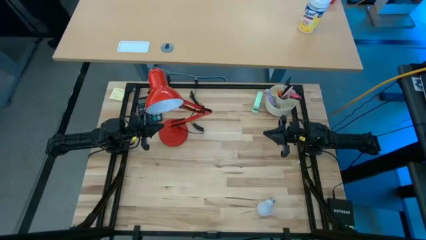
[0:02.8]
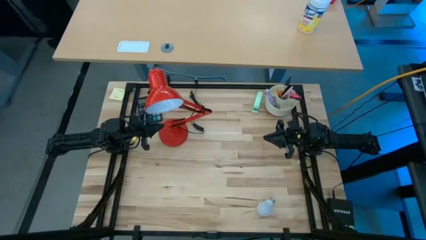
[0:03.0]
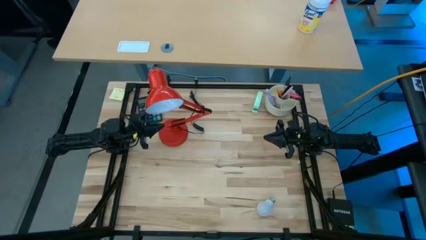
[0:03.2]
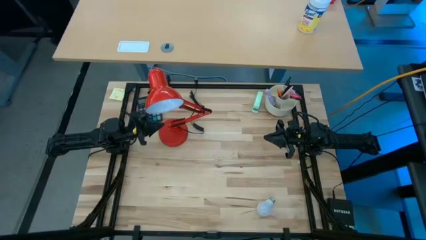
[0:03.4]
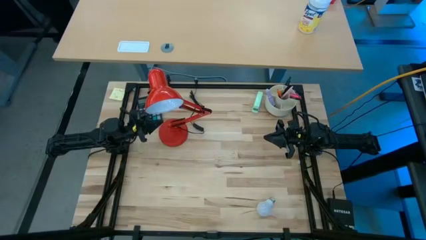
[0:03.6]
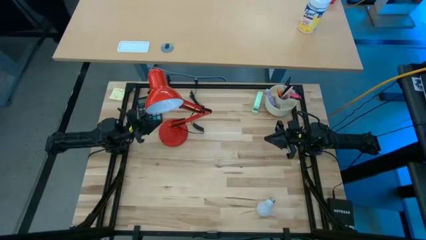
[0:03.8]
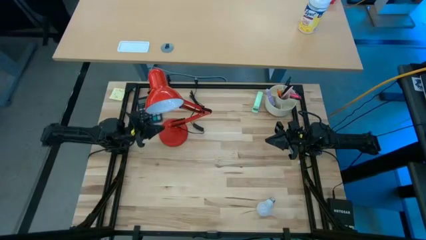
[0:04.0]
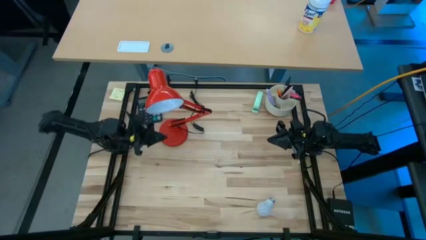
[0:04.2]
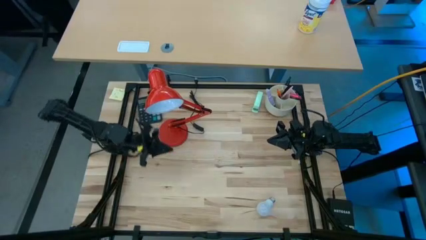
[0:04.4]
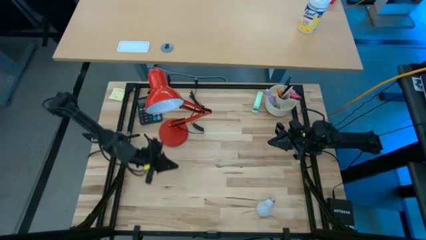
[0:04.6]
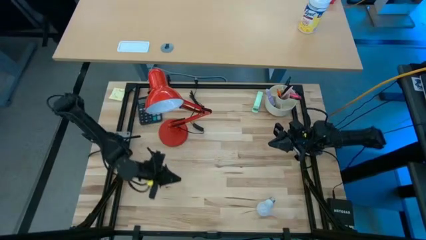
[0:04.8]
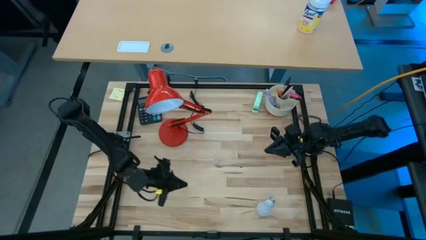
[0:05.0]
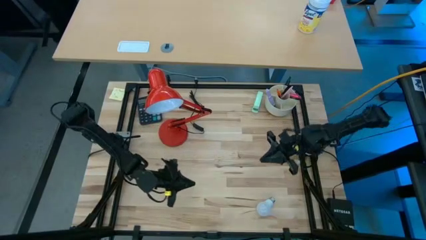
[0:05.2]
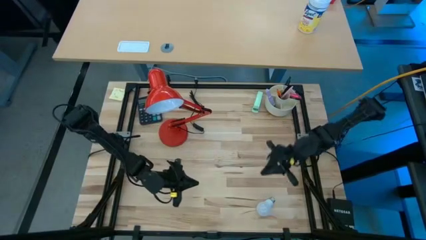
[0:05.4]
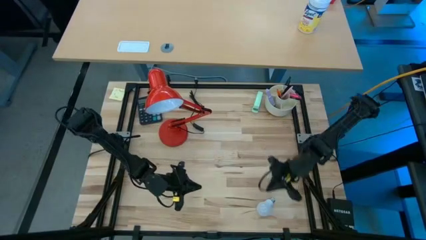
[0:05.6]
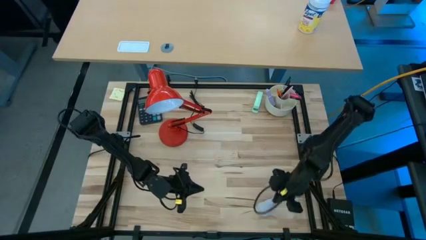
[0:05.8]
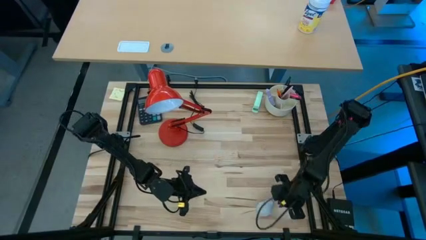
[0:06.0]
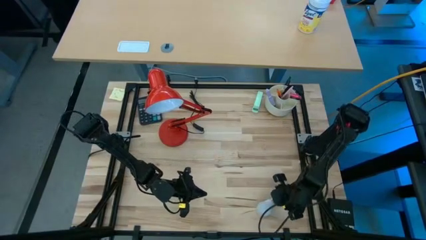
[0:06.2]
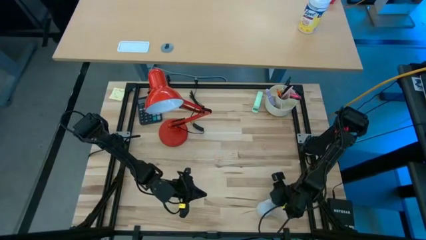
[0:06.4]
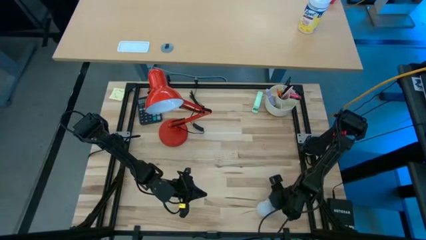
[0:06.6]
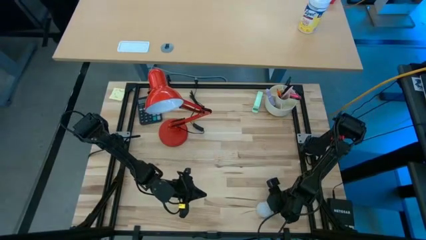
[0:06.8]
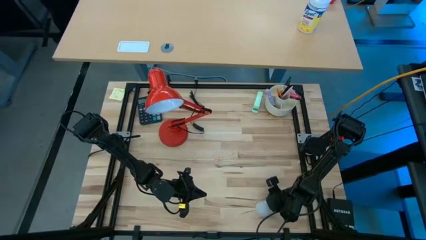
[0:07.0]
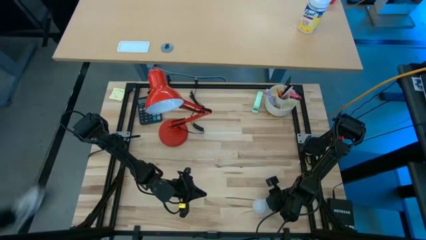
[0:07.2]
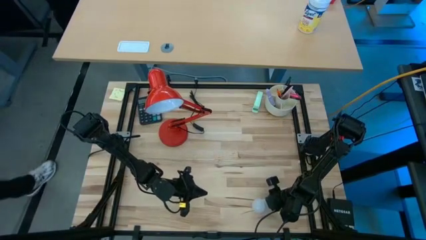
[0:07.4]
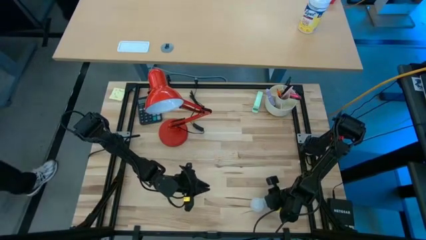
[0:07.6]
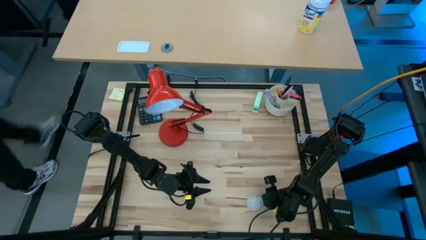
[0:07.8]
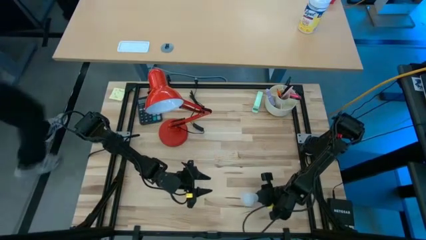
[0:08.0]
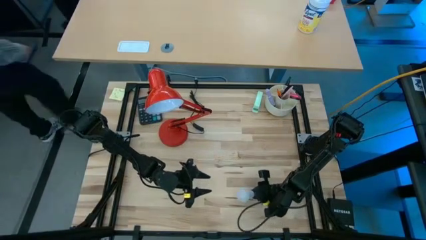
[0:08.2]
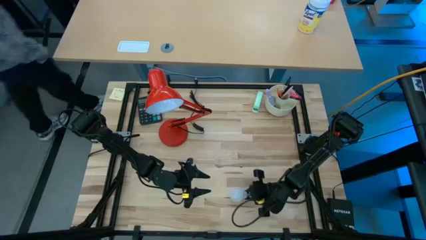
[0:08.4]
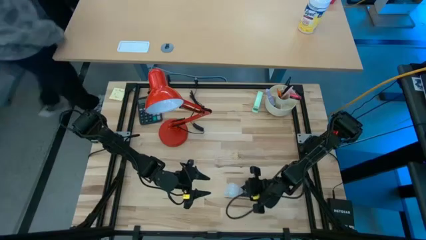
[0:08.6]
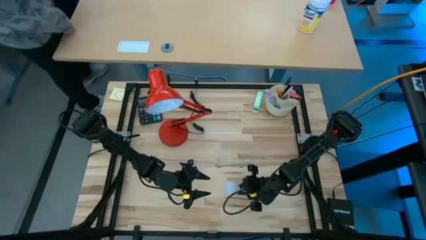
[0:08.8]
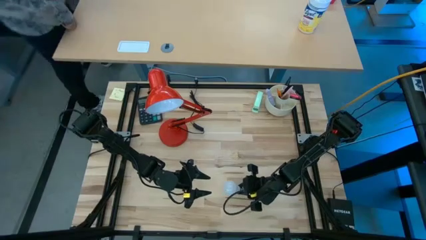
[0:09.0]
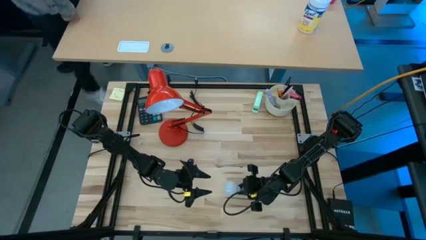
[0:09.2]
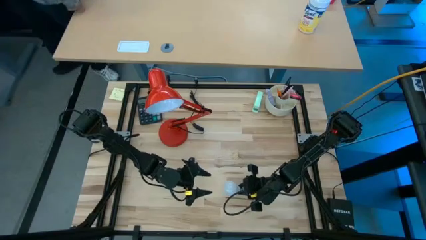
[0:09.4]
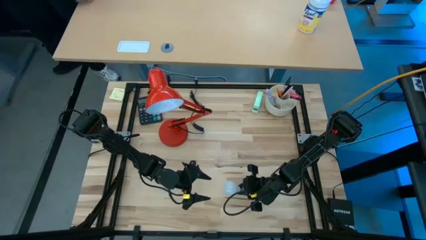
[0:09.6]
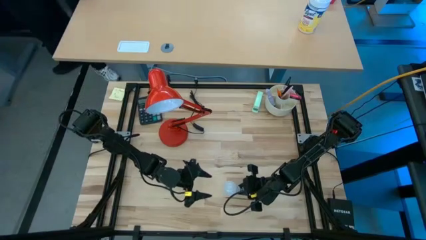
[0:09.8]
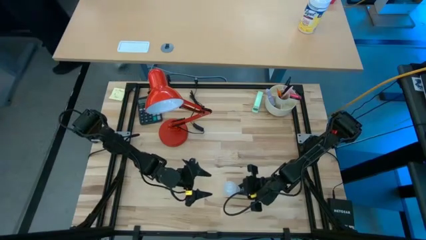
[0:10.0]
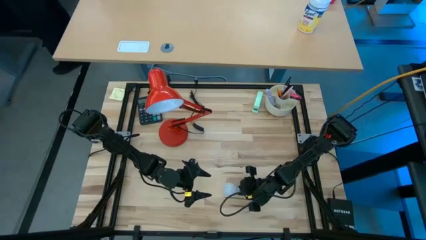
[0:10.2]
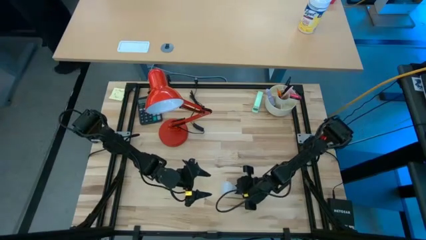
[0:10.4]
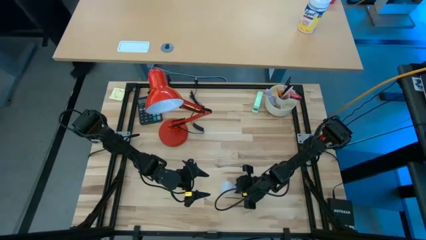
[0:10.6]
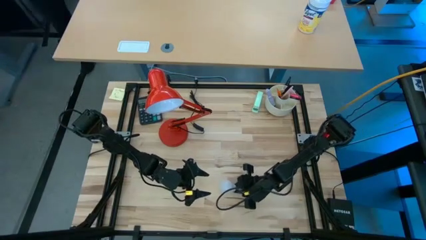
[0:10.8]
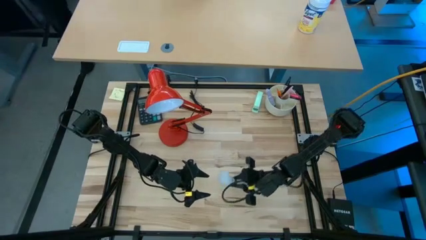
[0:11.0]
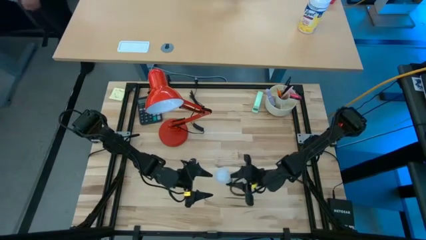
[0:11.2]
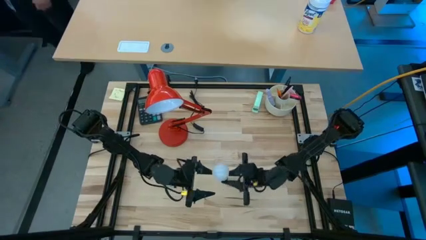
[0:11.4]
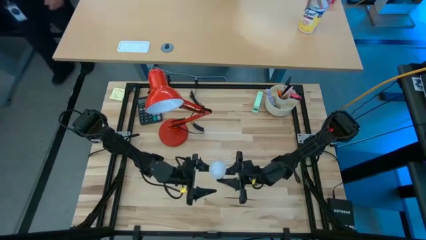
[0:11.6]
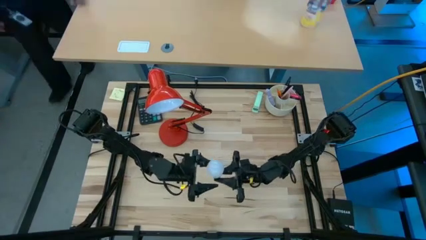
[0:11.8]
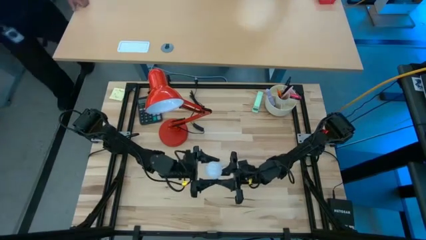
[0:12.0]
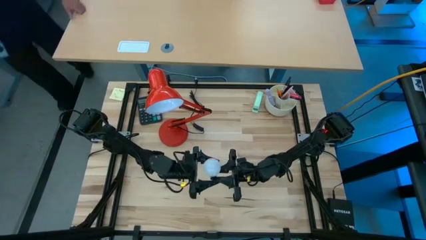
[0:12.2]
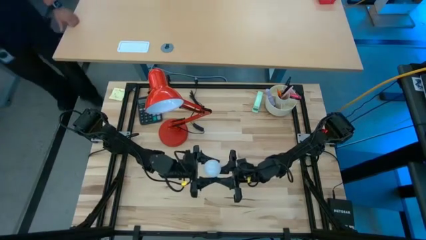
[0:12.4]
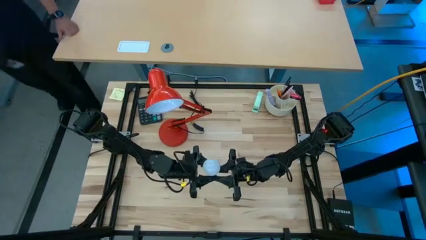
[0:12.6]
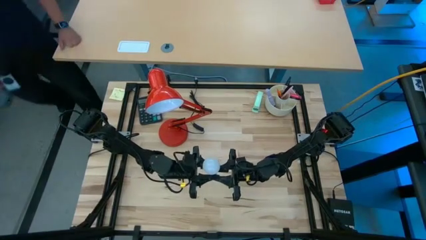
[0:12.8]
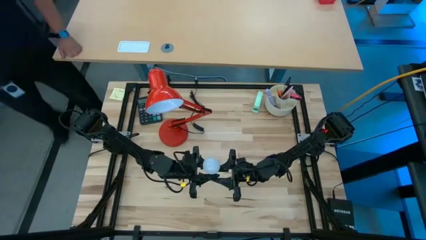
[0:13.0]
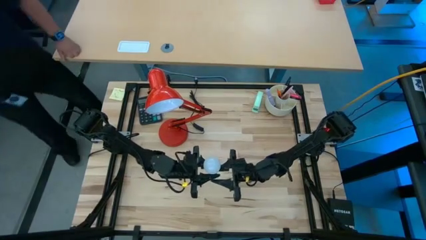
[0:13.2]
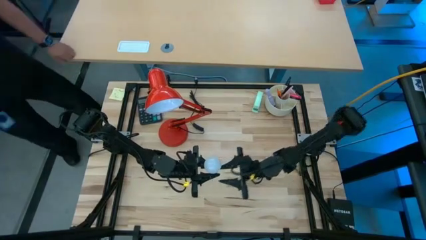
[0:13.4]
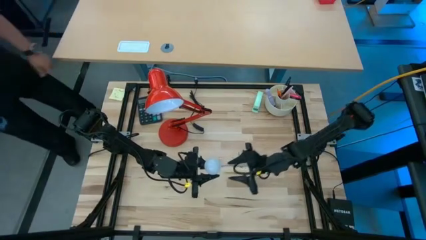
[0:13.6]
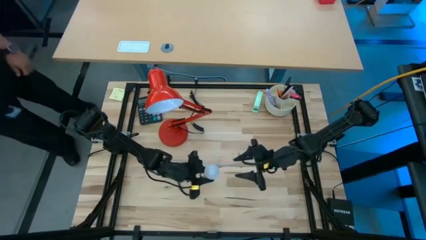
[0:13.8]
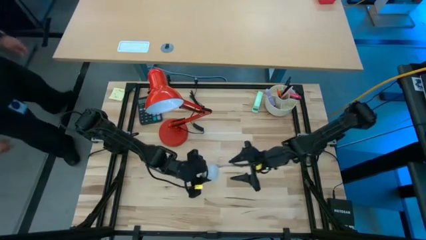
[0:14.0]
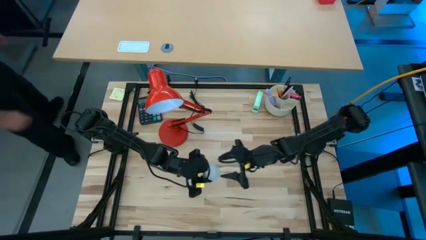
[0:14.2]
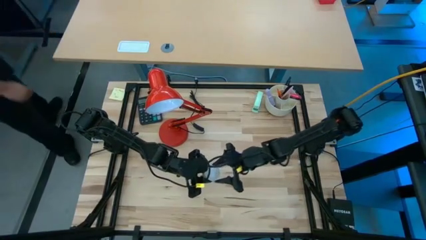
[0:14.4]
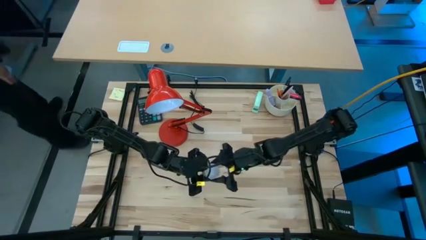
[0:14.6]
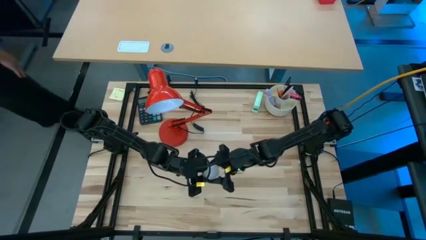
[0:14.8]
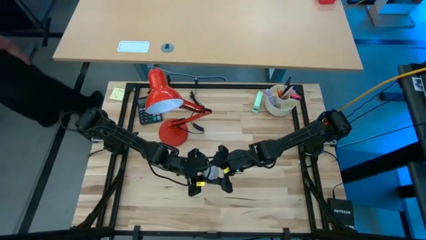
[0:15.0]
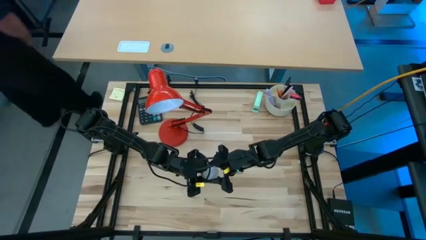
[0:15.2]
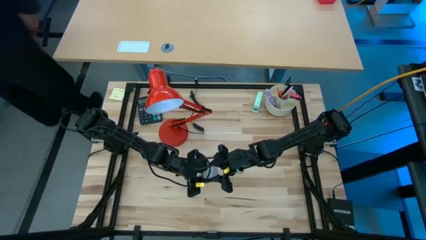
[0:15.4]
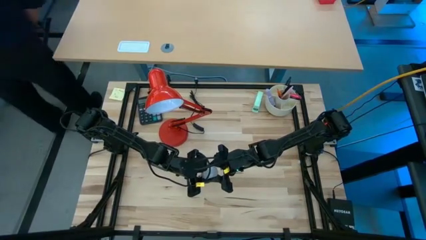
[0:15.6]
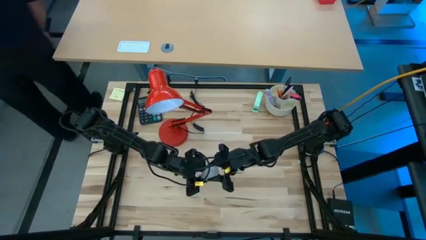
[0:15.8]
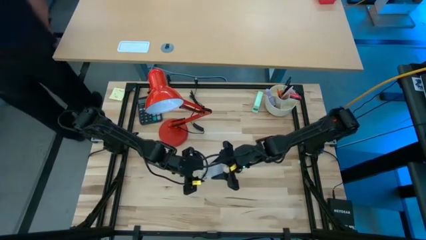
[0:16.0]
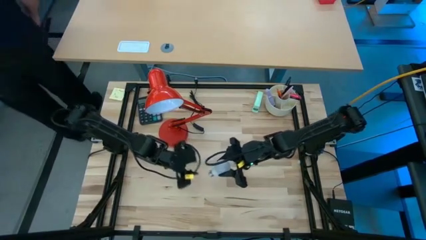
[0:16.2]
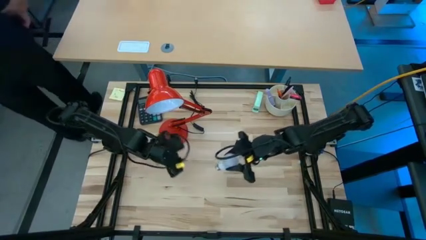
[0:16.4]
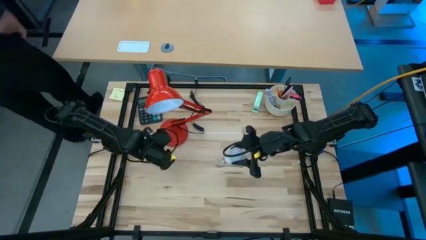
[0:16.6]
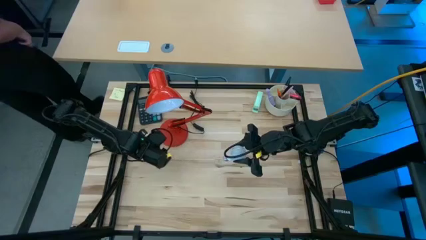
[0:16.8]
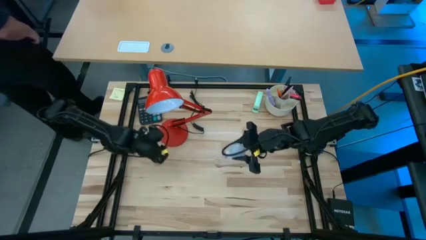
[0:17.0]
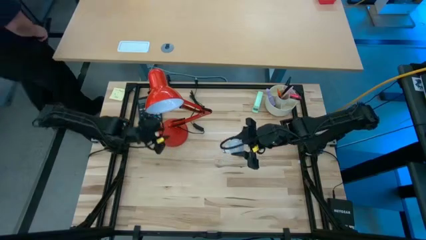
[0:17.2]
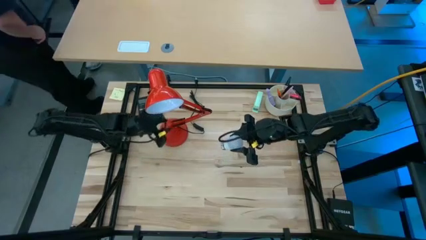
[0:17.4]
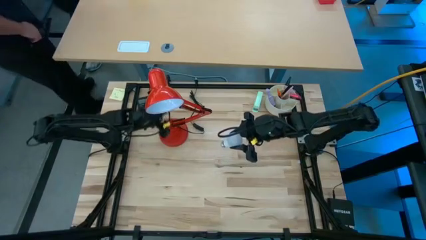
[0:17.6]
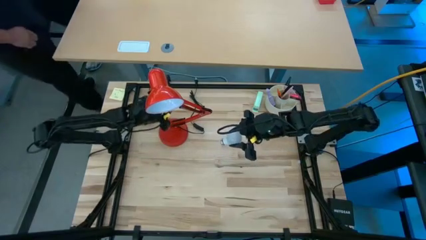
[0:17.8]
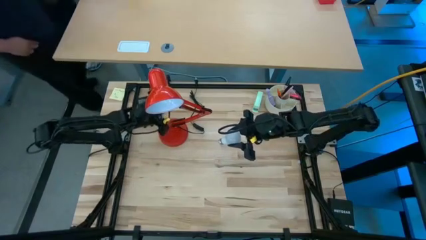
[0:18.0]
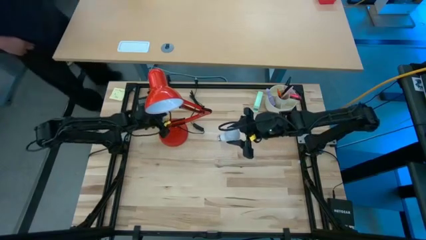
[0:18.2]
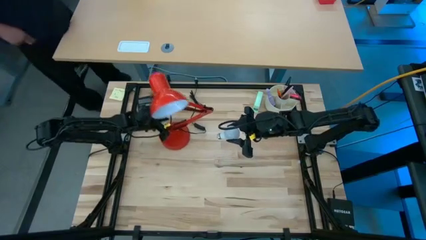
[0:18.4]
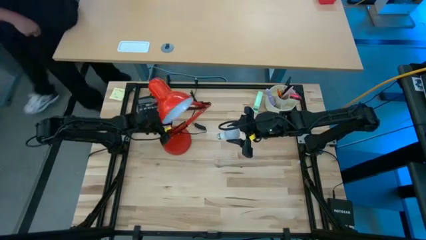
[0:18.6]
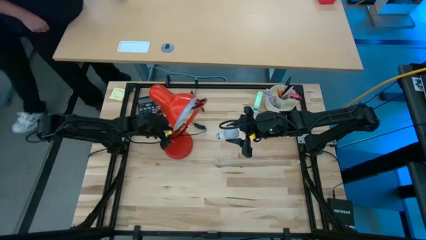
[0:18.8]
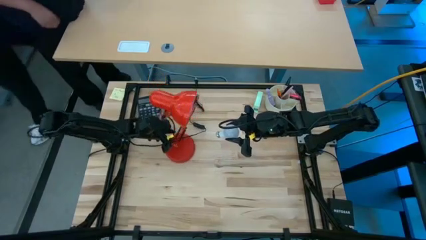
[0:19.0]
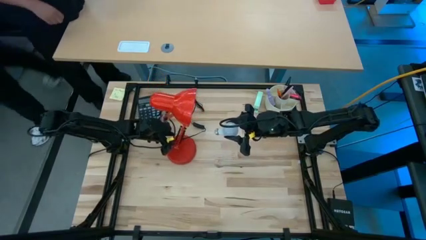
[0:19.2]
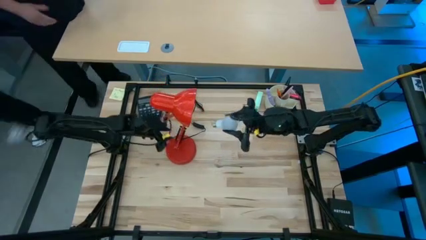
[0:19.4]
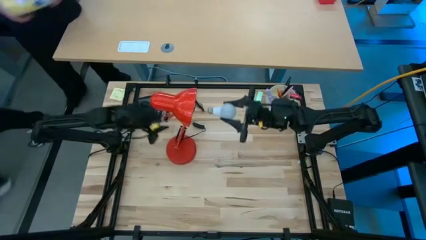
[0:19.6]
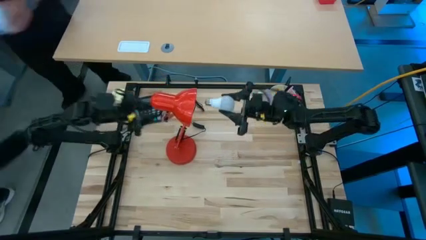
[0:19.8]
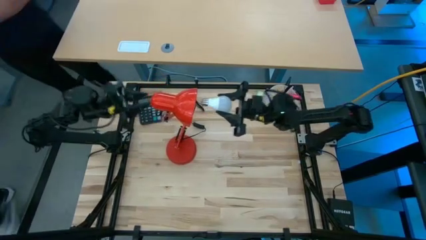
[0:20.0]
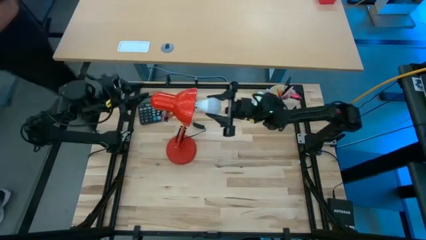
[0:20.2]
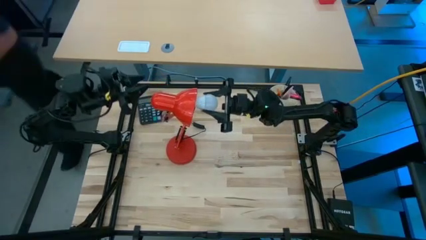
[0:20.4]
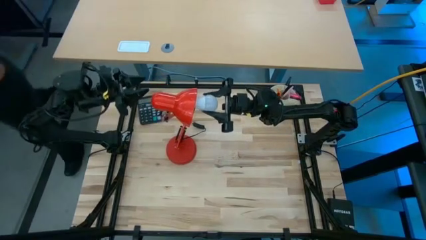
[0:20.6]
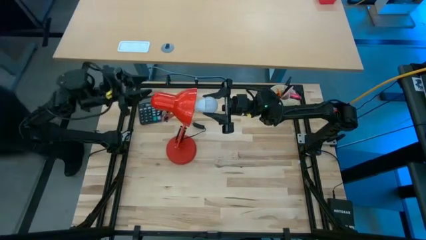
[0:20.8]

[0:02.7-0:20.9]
Task: Screw lightbulb
Insert the white lightbulb into the red desk lamp
